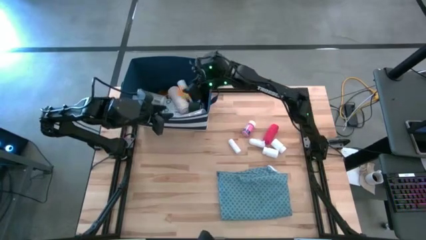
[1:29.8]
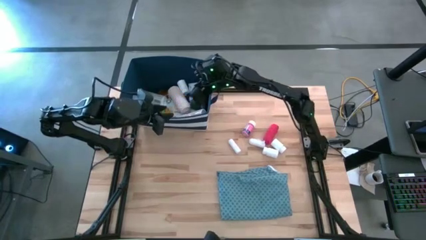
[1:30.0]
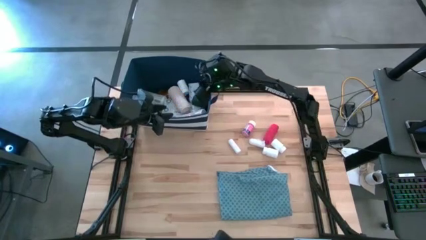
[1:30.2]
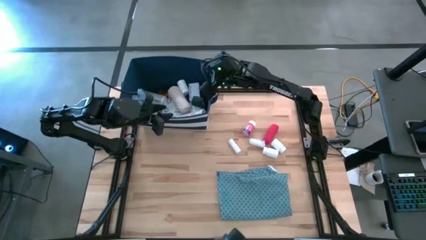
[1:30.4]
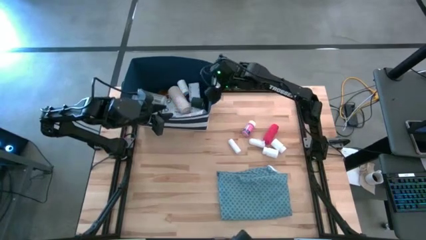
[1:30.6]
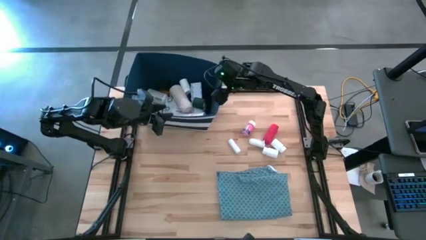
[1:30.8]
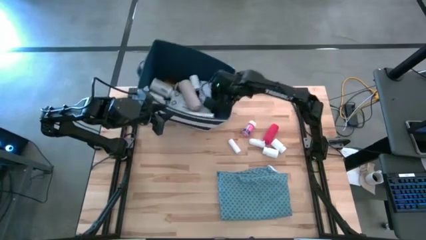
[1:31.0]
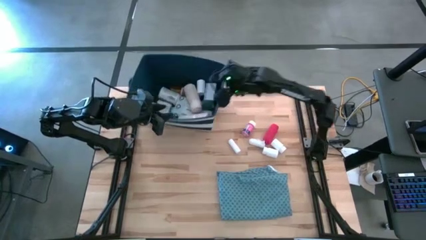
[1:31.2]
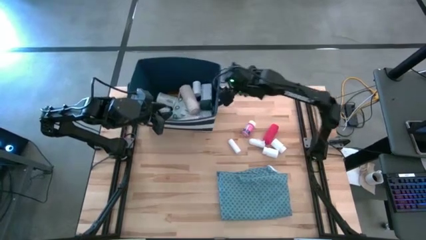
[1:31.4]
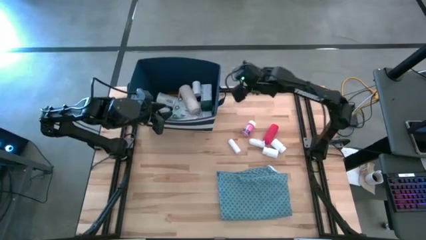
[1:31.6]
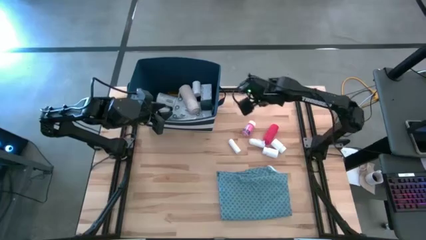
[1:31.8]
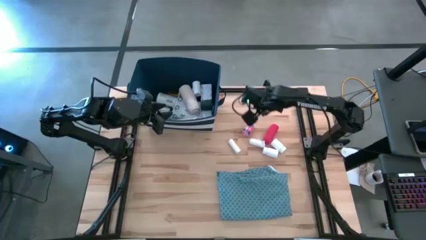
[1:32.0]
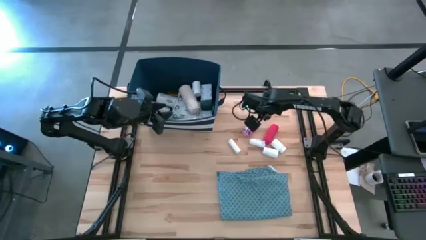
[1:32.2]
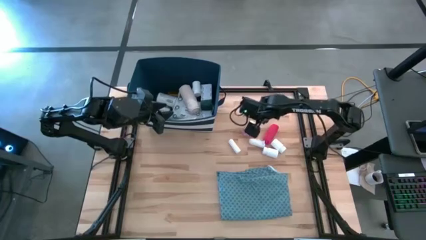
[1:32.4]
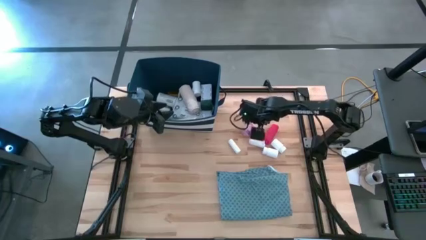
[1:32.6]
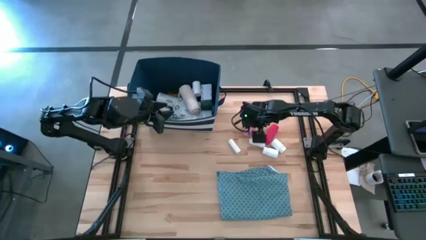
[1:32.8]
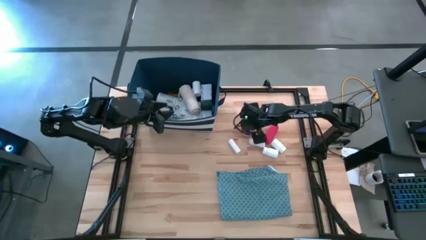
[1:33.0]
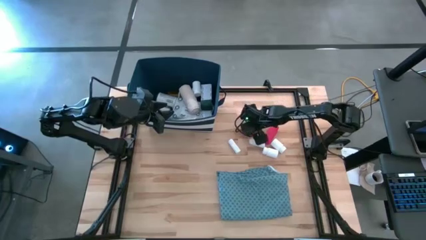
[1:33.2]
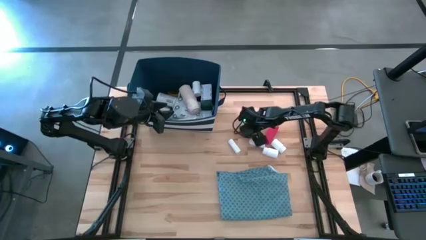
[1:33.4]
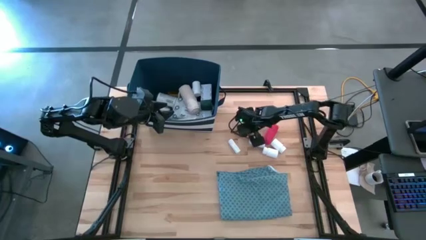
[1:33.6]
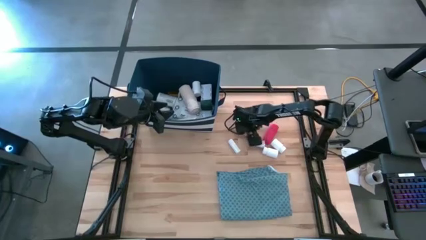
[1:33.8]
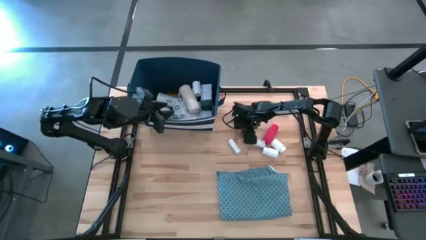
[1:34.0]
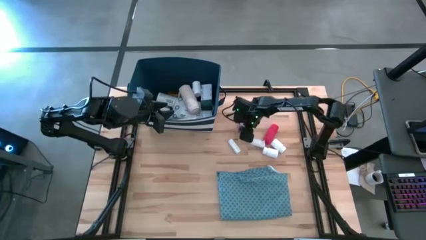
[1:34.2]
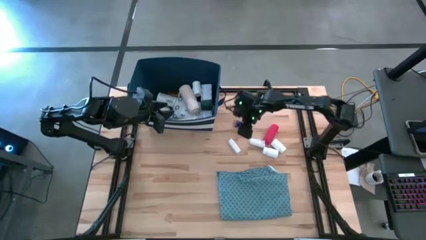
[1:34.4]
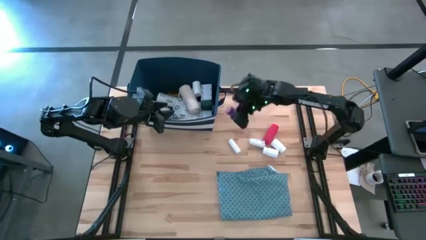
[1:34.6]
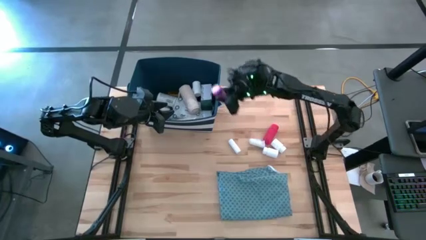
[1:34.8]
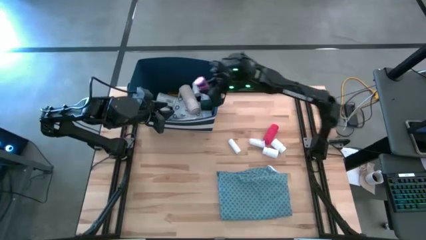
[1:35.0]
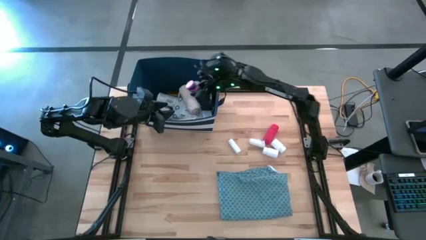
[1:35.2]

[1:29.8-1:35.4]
Task: Pick & place medical supplies in basket/bin
Put the pink medicine bottle into the blue bin

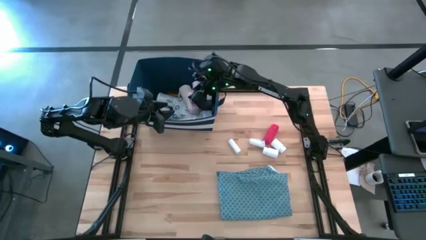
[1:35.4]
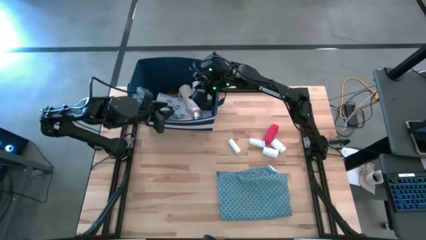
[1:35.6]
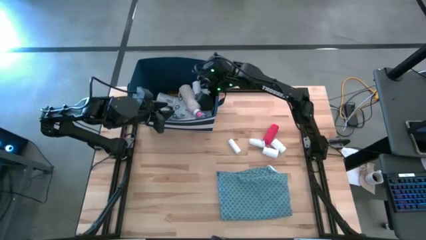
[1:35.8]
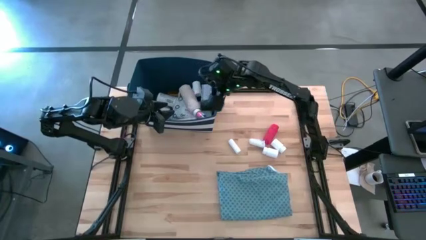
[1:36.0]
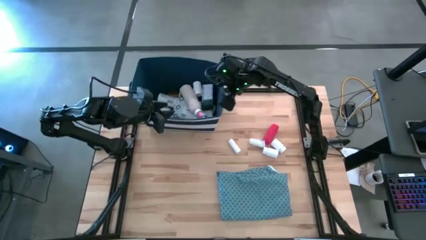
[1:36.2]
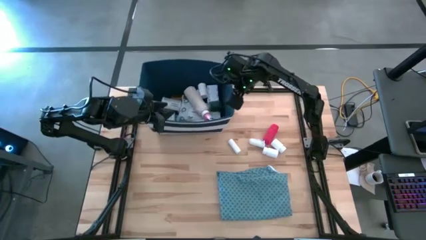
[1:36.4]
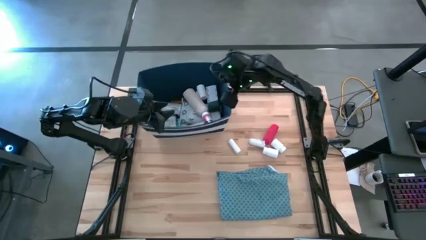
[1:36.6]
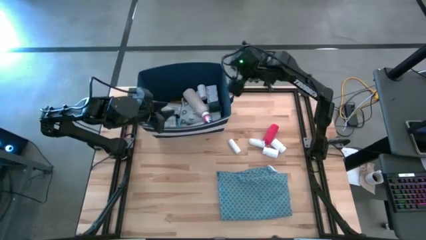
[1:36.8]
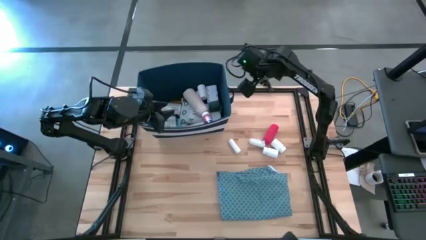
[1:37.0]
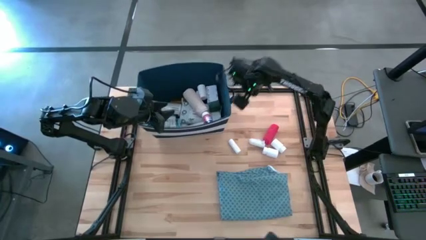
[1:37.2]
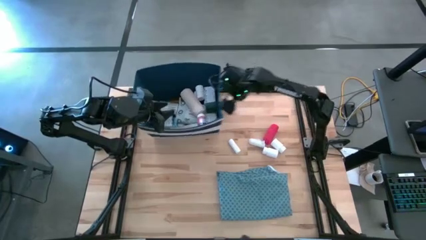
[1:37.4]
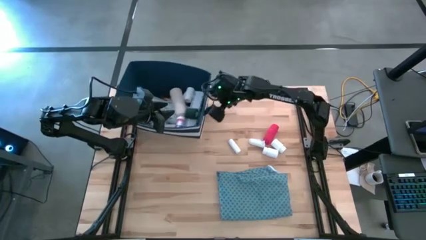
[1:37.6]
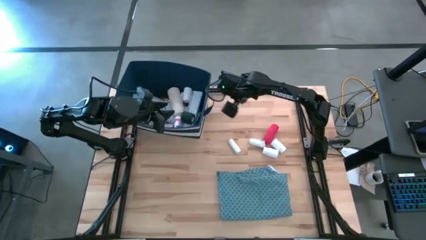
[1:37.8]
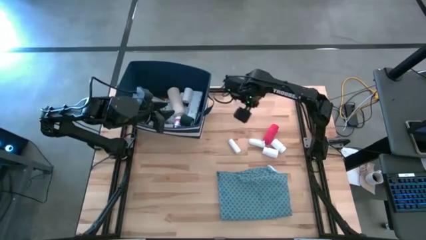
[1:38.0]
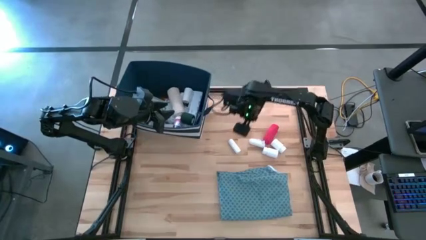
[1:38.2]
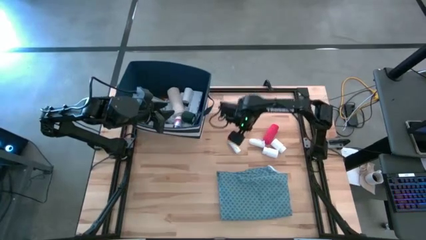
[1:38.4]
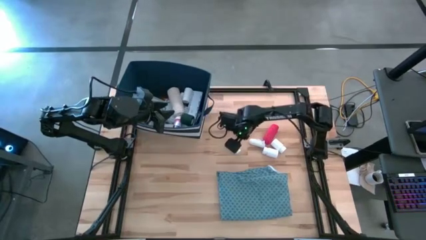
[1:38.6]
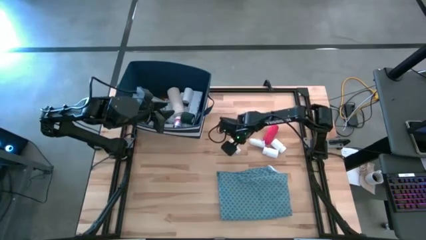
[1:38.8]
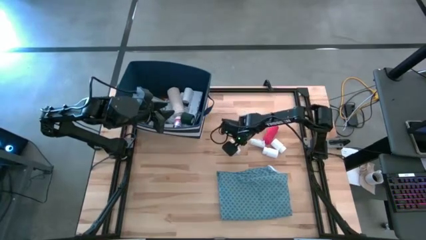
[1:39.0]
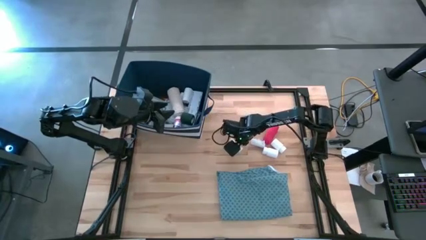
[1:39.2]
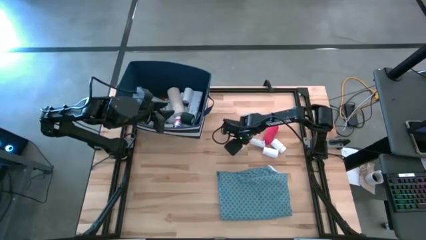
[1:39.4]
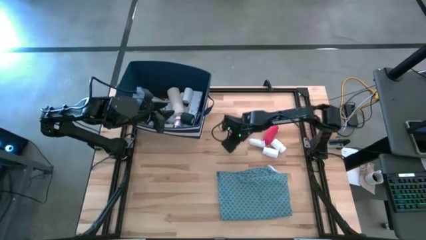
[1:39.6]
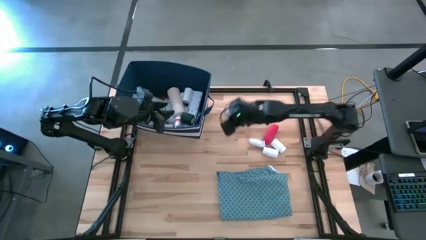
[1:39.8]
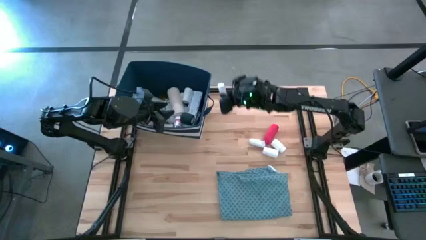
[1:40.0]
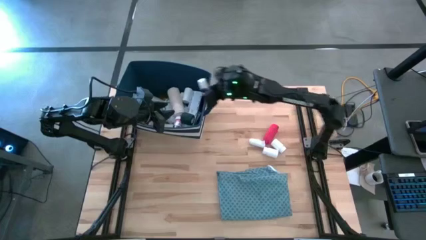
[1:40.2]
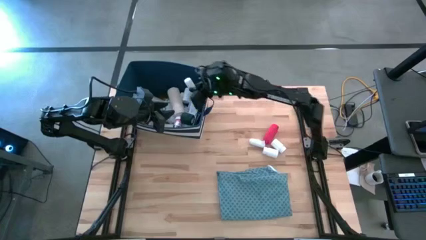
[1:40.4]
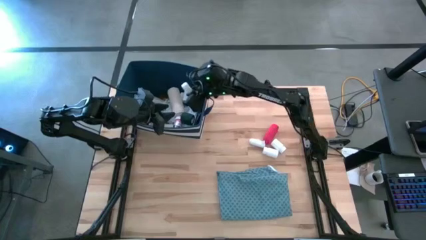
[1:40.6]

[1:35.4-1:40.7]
Put the white rolled gauze into the blue bin

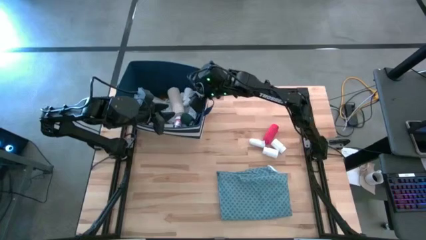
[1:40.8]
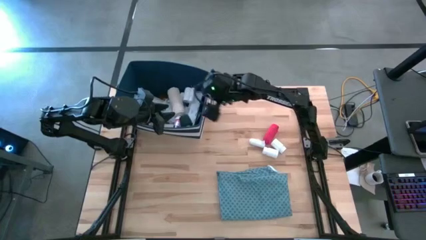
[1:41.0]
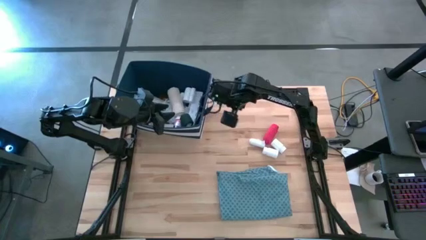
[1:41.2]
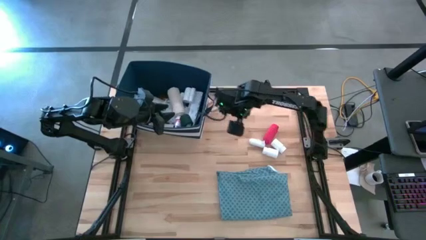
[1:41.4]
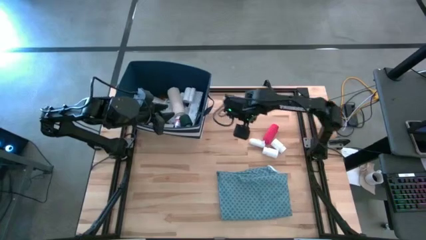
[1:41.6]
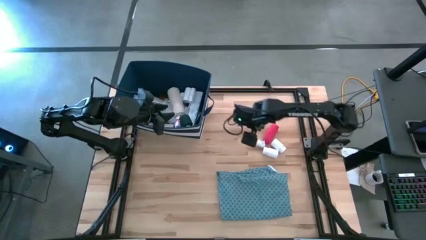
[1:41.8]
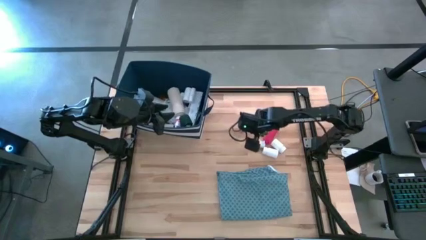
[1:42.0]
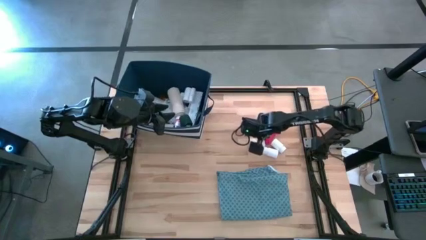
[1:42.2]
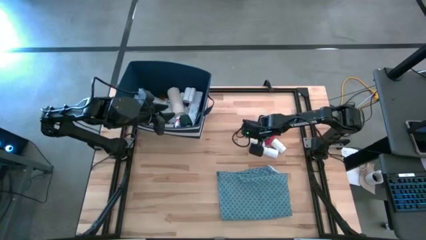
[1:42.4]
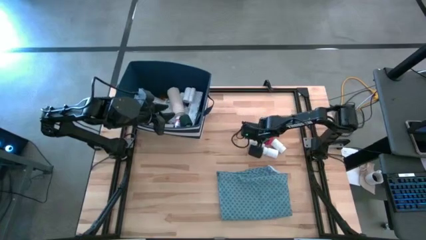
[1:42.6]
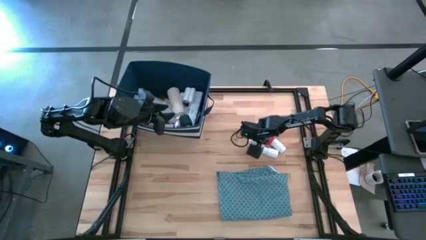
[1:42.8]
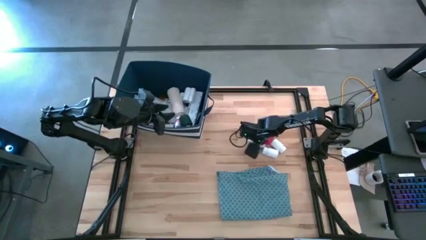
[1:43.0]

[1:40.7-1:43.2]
Put the white bandage into the blue bin

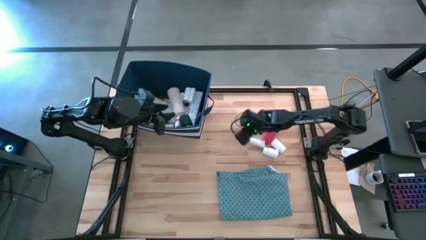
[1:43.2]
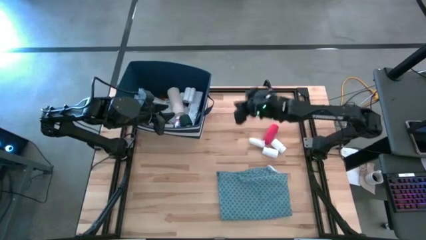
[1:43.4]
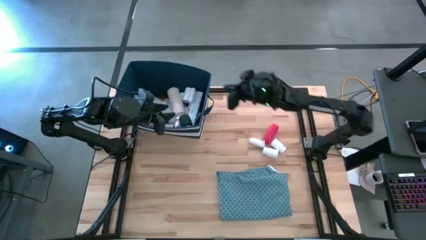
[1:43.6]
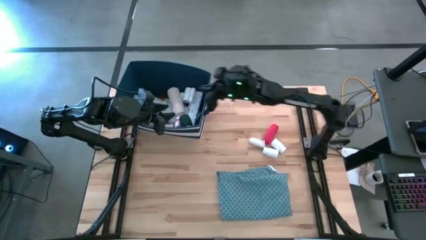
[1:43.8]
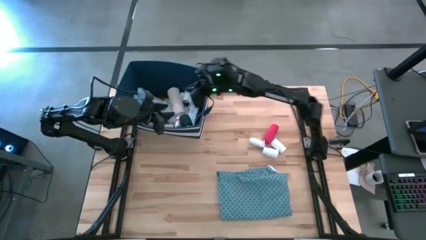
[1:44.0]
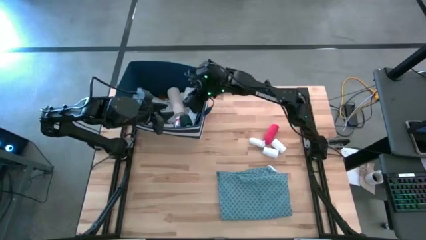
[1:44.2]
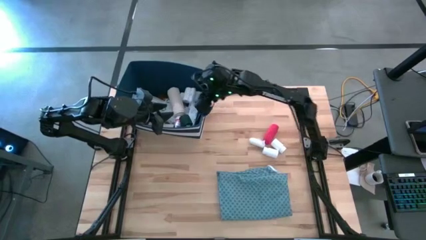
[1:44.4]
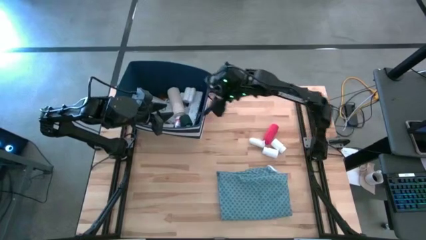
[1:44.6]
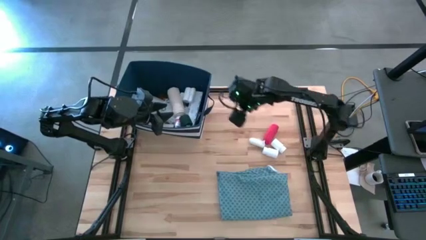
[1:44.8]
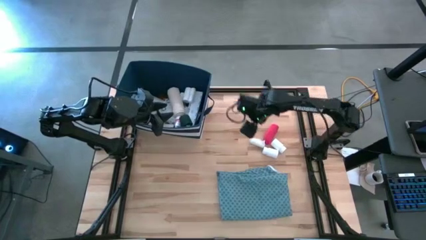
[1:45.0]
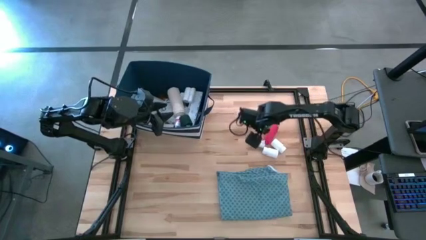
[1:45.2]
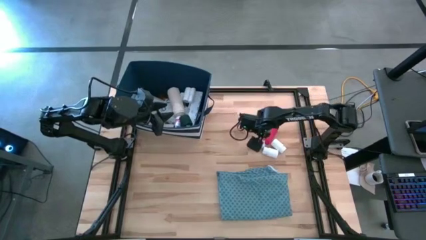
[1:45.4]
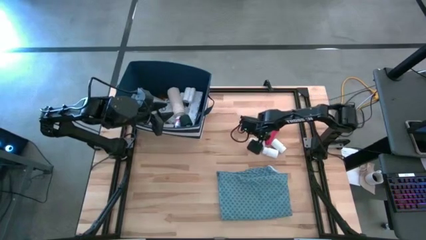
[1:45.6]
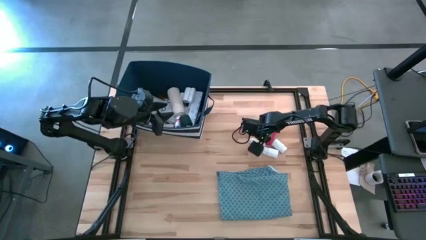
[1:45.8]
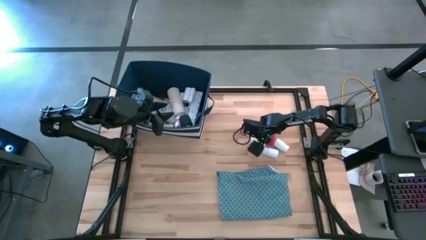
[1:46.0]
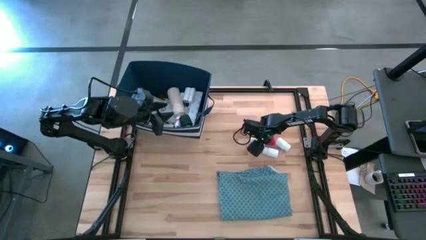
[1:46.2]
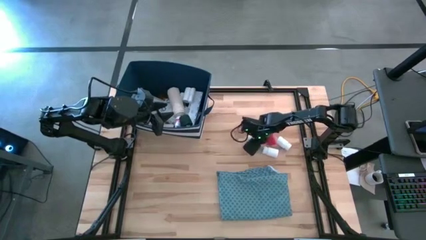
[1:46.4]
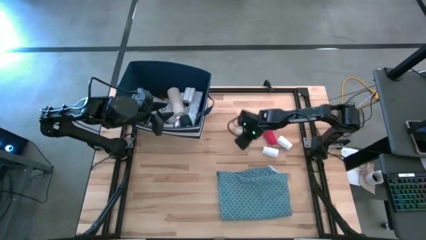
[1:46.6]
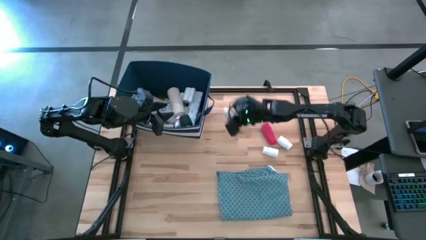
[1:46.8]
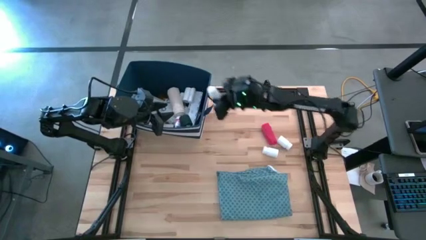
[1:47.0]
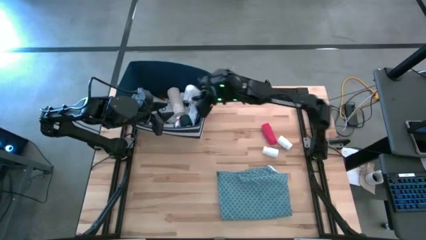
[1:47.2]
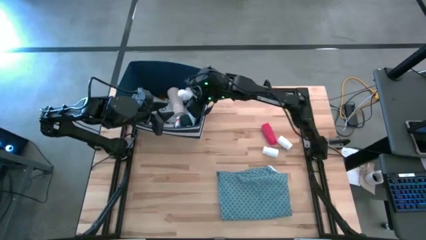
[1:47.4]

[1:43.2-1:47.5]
Put the white bandage into the blue bin
